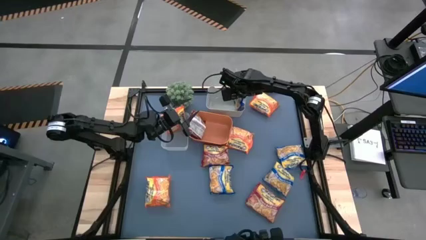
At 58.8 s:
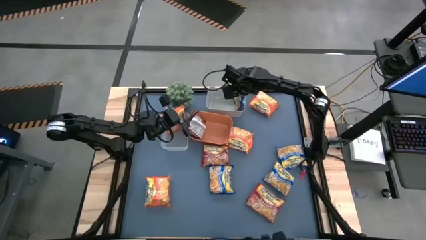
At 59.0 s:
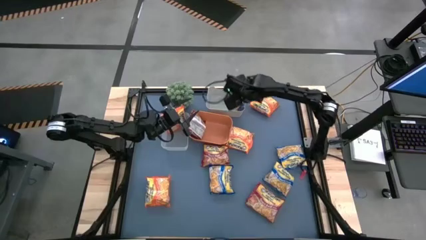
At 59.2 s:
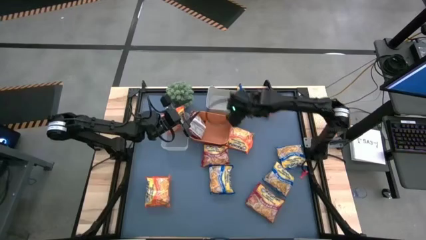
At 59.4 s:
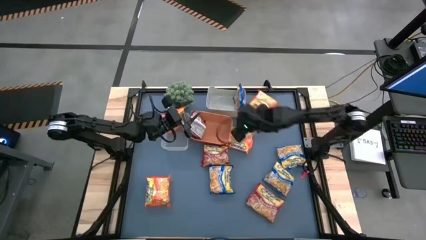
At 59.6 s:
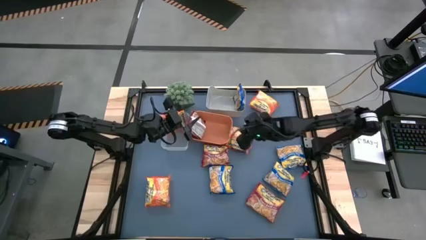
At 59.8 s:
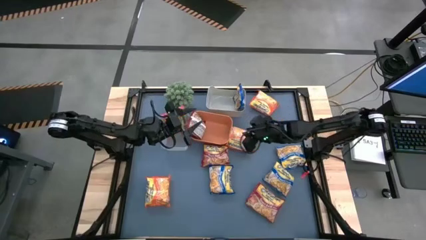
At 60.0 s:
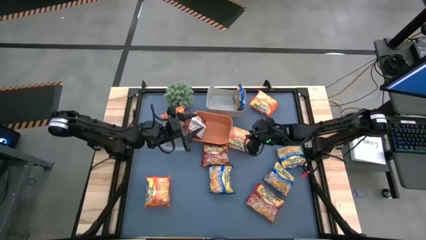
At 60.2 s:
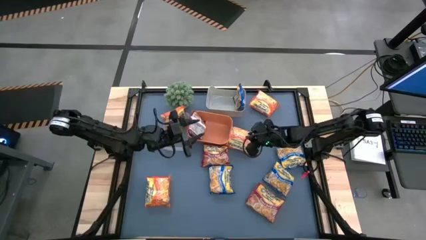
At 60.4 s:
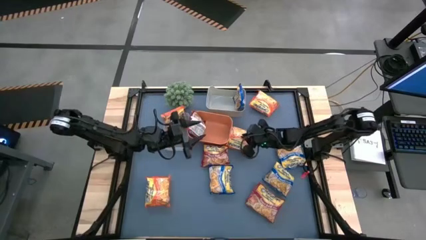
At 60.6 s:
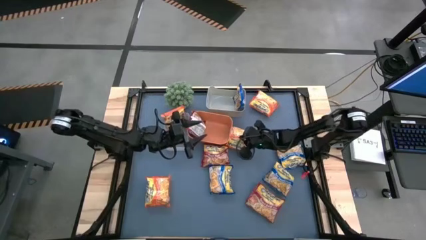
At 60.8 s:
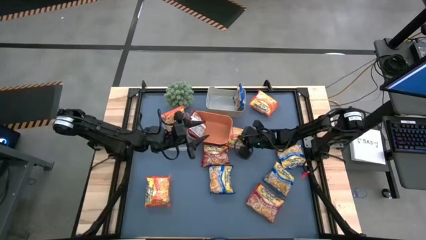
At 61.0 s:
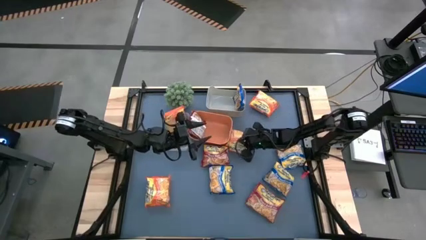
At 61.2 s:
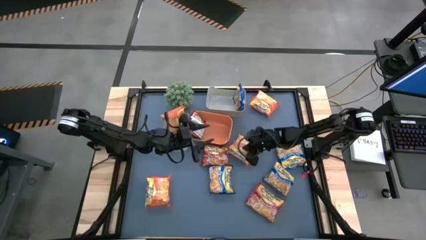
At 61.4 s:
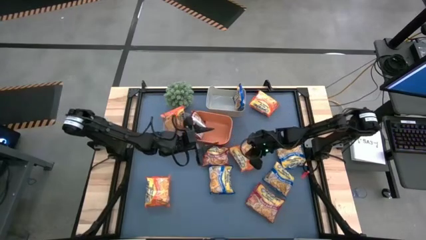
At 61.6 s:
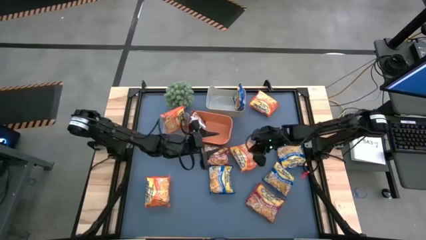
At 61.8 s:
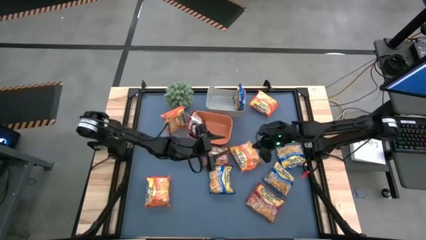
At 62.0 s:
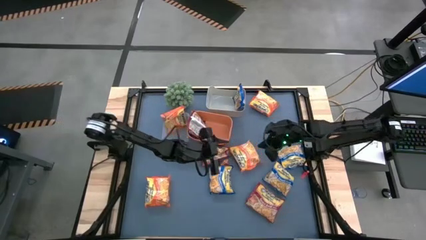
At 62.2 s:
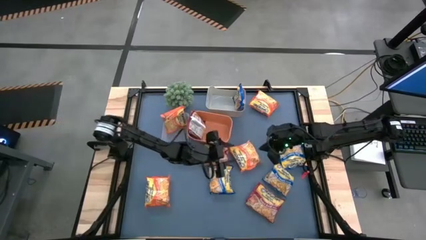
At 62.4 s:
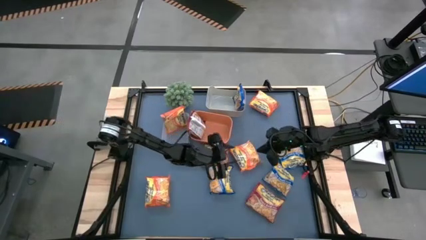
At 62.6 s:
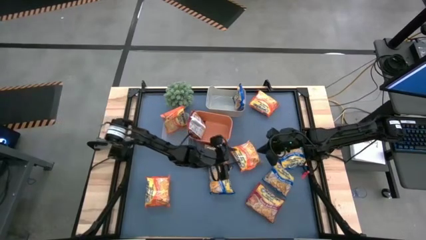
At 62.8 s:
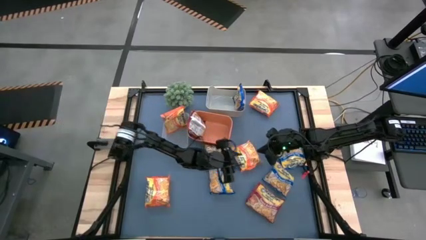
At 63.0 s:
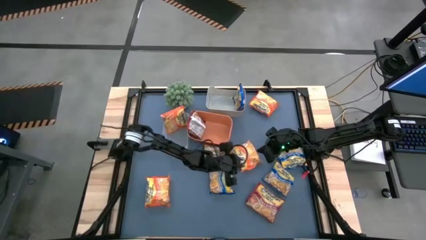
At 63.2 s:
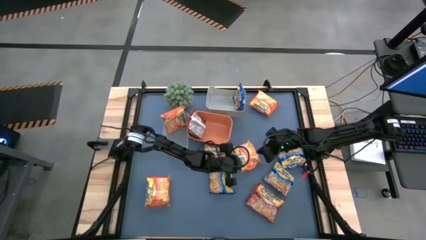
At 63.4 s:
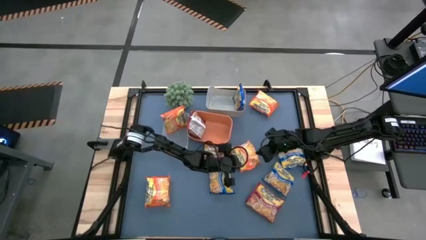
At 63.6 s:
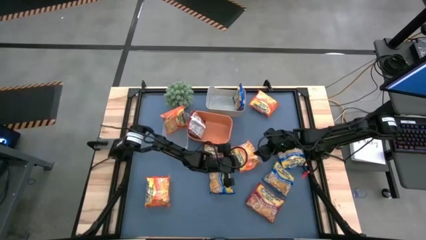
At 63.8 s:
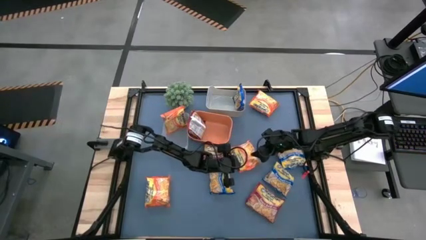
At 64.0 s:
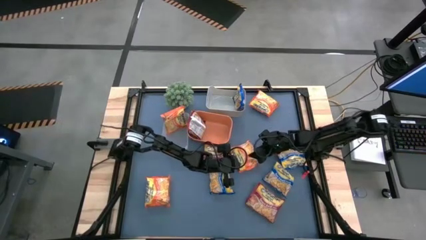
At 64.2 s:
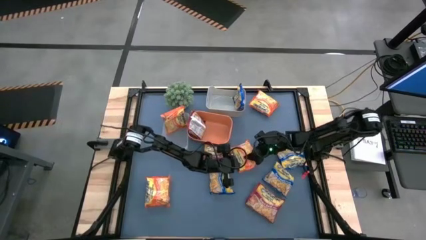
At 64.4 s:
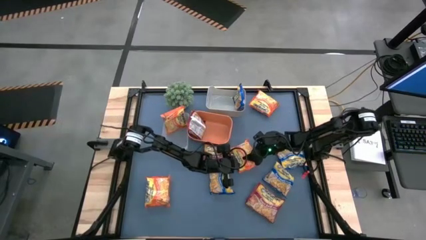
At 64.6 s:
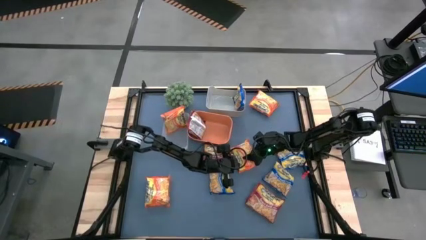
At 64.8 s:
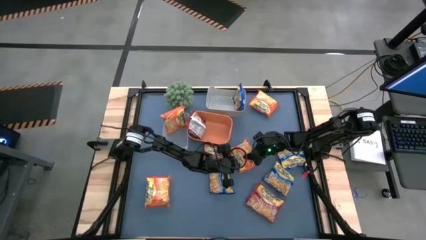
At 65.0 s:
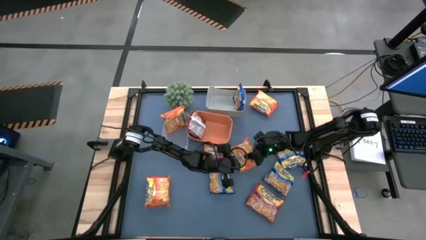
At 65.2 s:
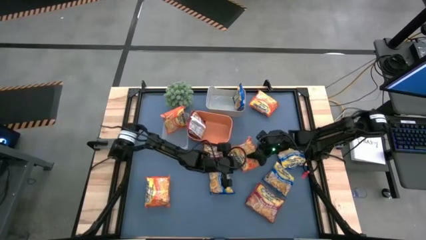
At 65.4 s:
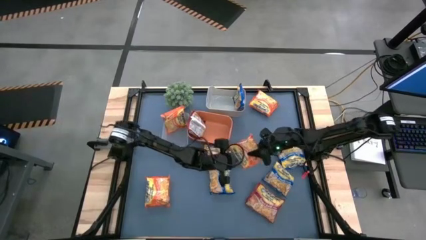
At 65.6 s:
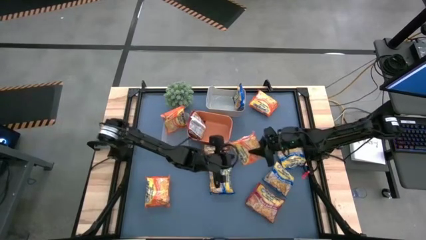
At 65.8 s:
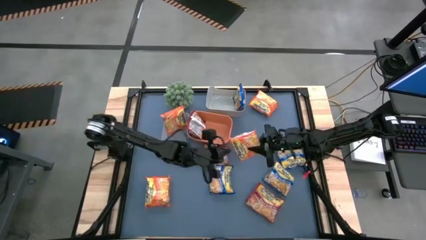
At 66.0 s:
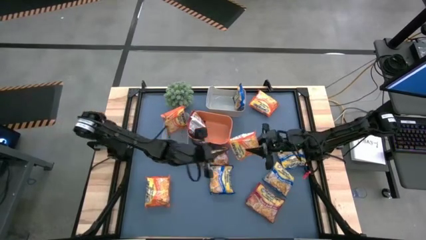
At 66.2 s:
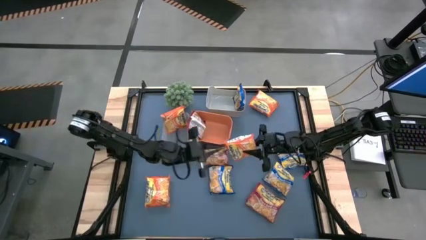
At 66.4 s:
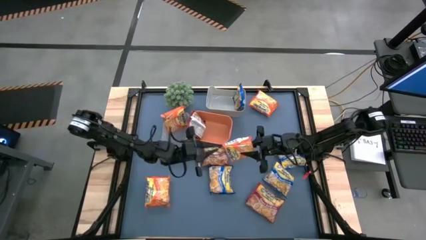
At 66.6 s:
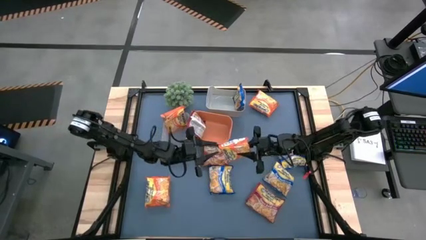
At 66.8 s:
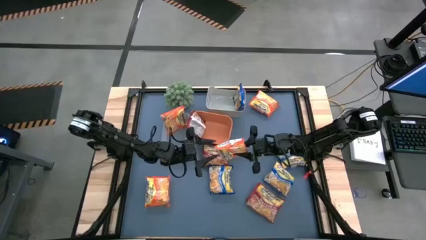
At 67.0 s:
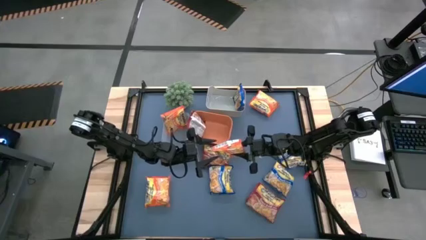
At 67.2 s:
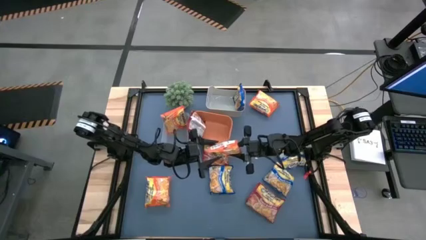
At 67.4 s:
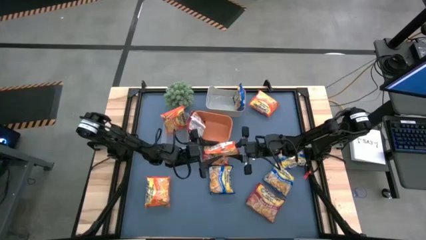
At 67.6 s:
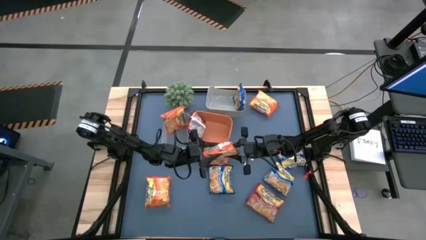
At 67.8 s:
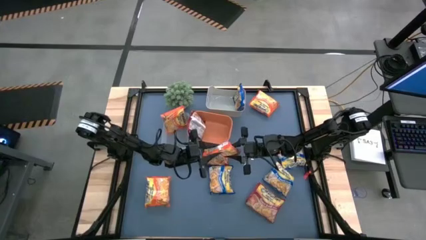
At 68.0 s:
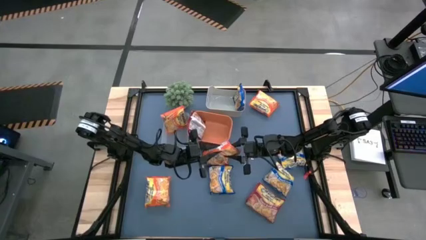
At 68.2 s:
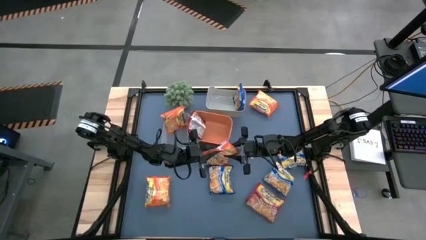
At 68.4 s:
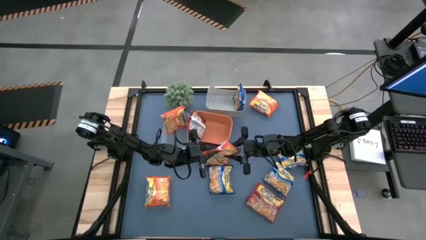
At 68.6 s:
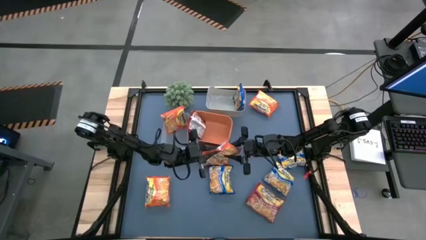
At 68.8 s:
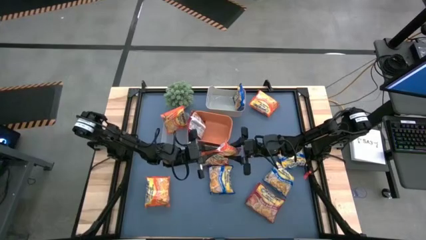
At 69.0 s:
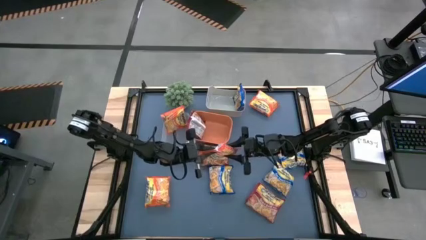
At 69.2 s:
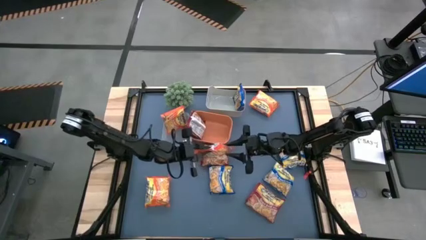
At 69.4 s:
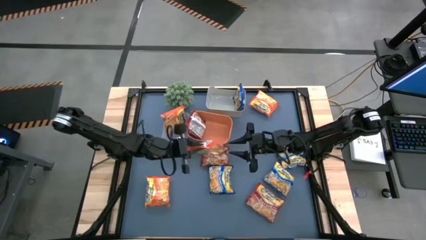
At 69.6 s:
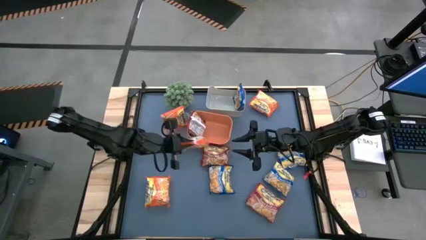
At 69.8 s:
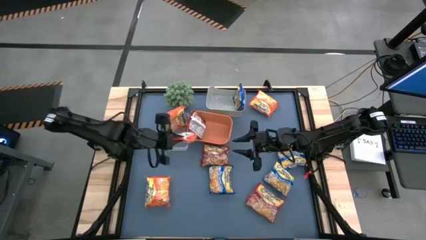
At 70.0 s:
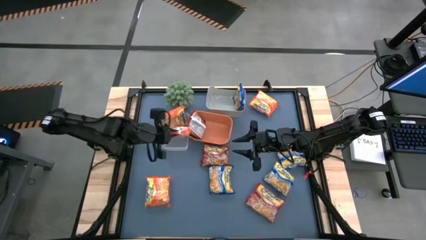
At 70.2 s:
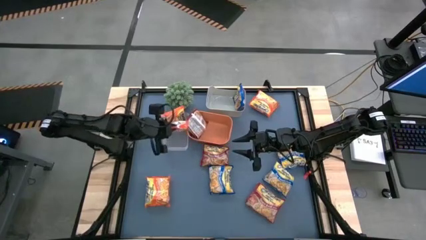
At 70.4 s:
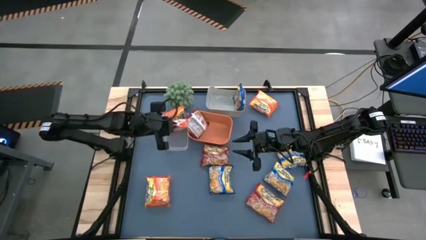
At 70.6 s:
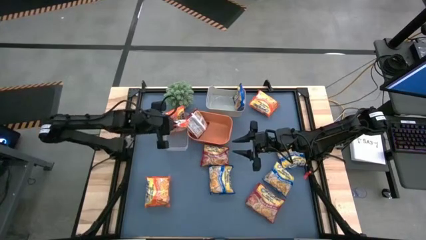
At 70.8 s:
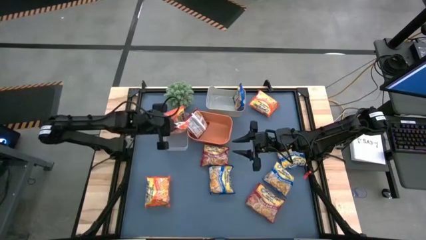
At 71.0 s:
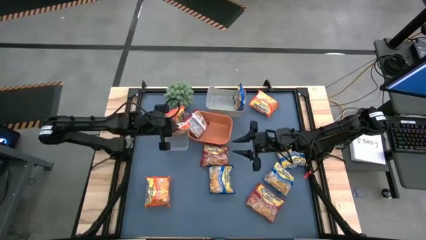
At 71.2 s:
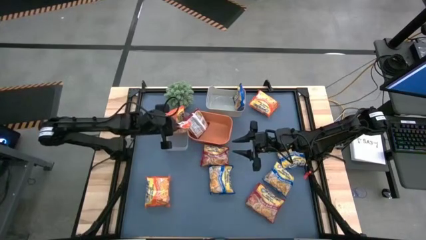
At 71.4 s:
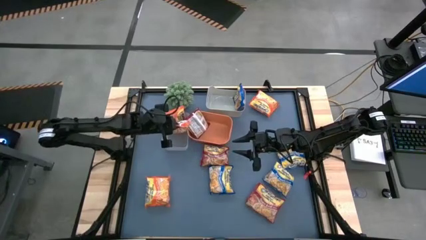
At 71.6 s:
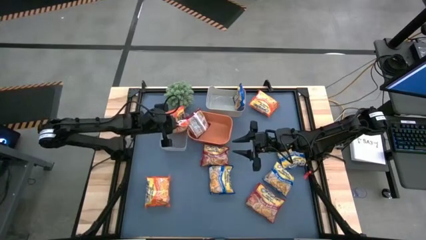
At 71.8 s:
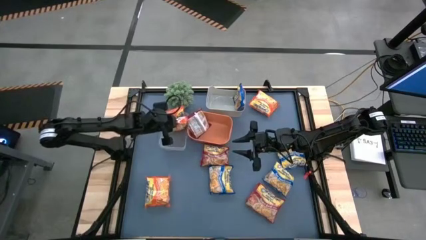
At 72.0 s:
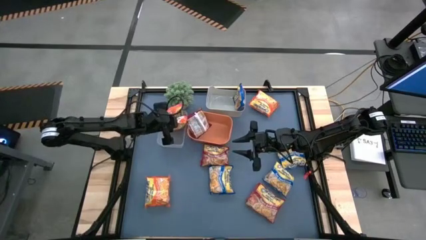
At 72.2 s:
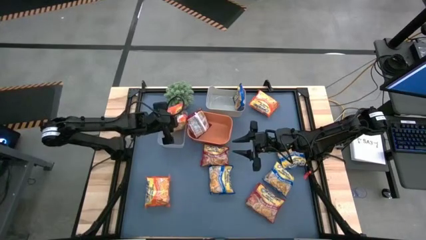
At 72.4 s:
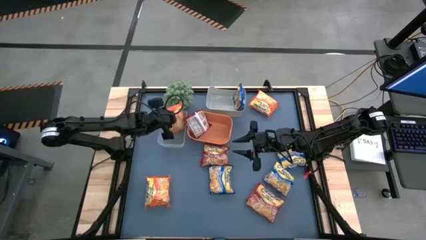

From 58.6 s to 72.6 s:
Task: Sort Maruchan noodles
Put the orange noodle pack into the transparent bin

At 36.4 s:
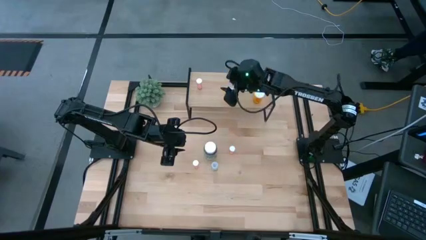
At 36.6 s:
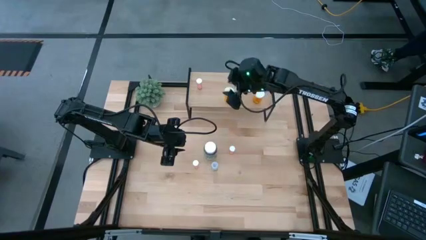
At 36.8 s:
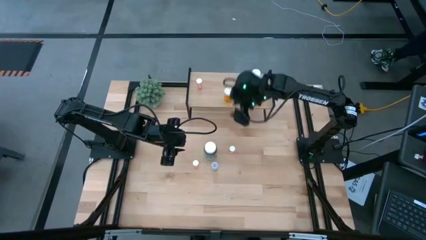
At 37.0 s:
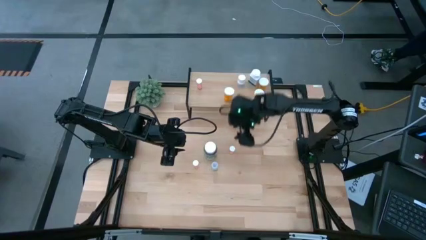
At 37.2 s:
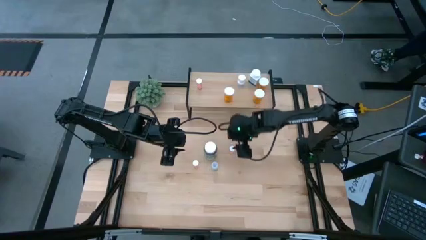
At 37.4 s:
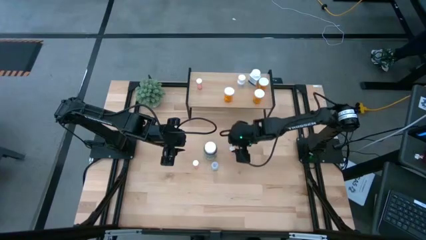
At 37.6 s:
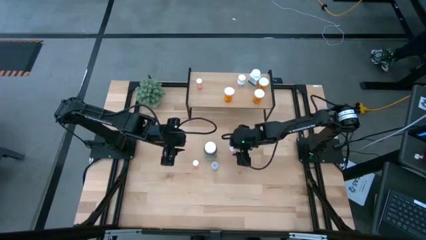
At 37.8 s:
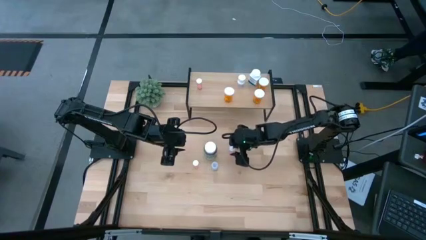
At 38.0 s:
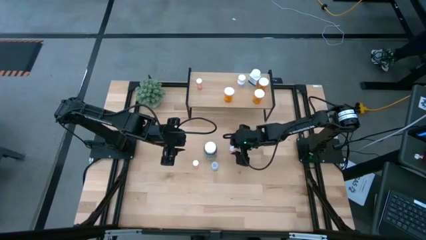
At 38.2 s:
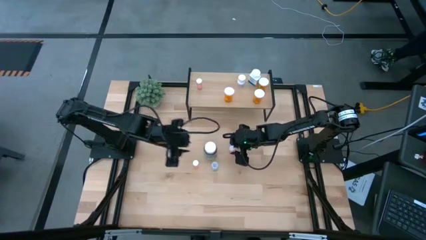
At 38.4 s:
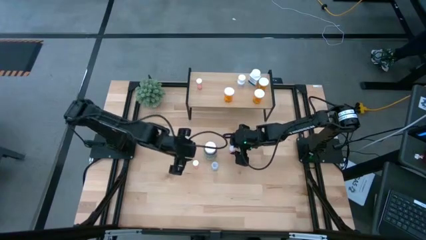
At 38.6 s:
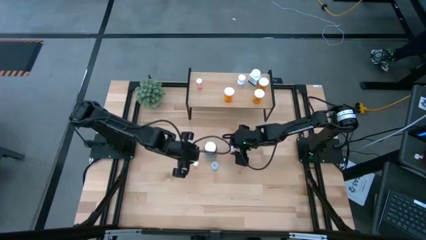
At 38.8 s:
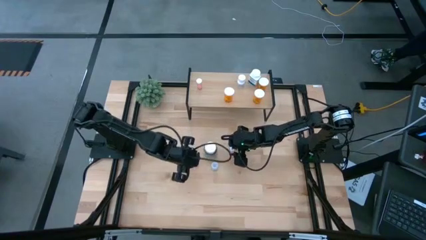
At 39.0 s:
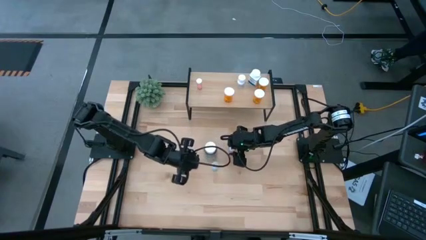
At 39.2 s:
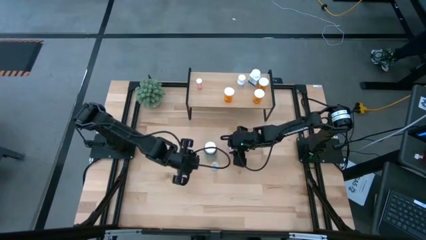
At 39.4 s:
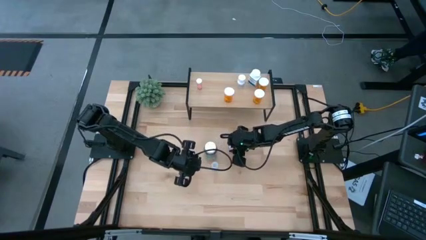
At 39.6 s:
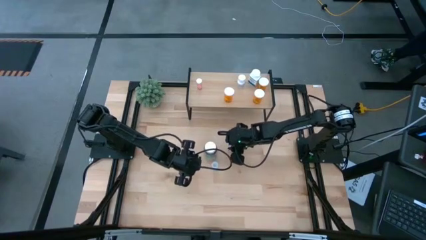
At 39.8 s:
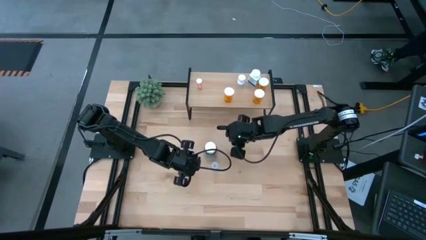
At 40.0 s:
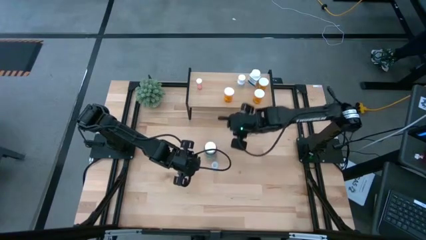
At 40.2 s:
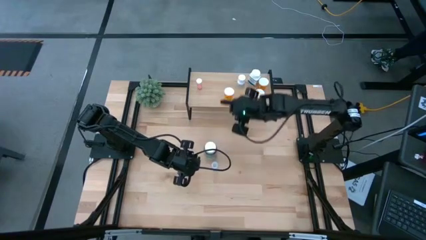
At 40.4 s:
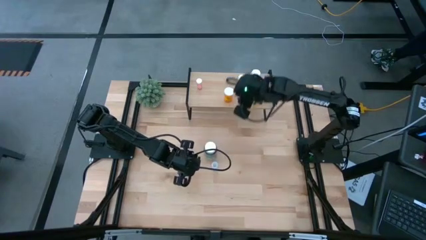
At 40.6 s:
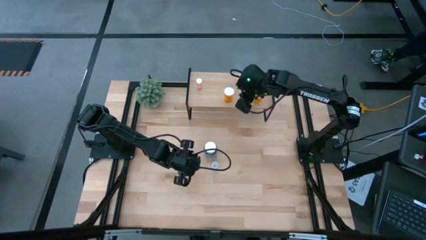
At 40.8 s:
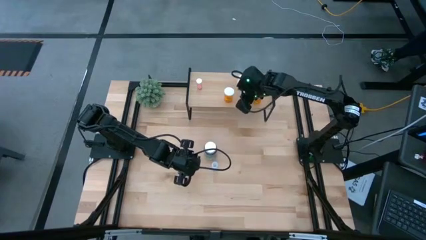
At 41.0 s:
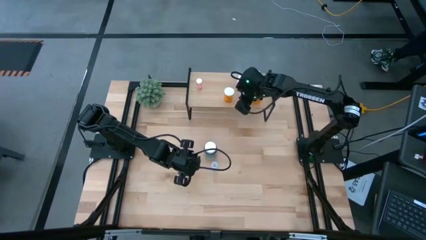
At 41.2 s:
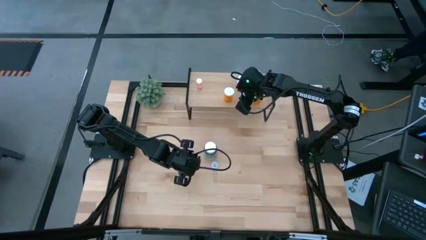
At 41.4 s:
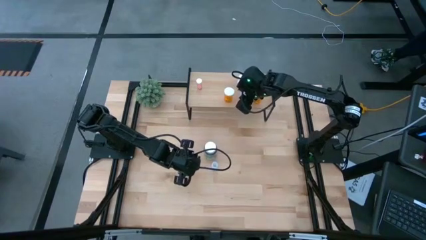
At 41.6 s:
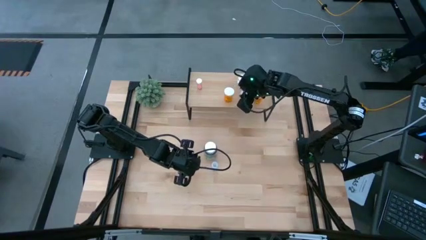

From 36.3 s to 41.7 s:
Task: Pick and place medicine bottles onto shelf by color
Put the right pink pill bottle on the shelf
